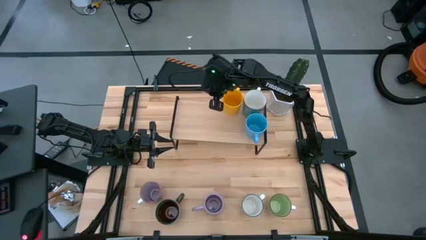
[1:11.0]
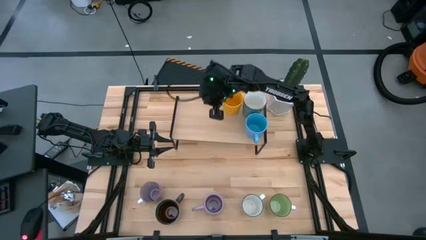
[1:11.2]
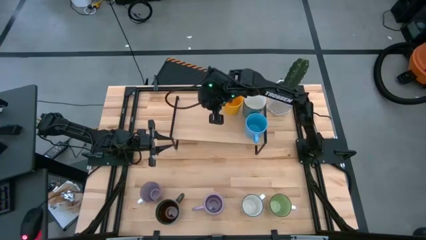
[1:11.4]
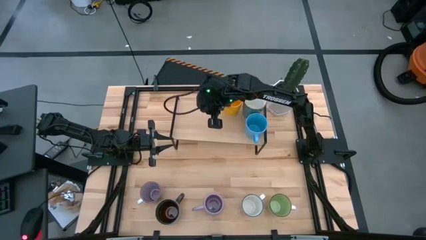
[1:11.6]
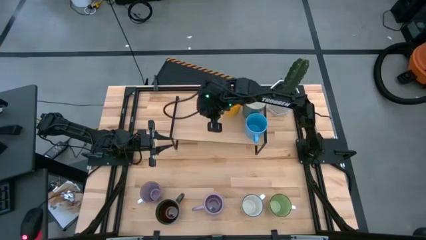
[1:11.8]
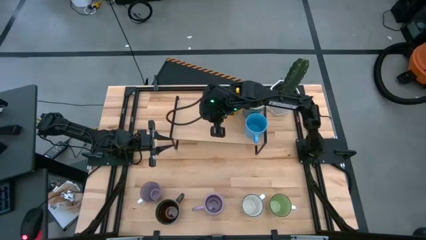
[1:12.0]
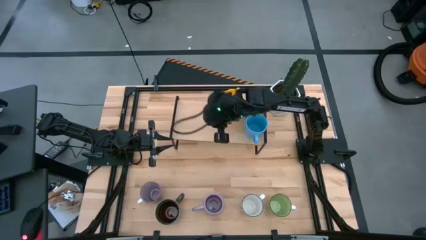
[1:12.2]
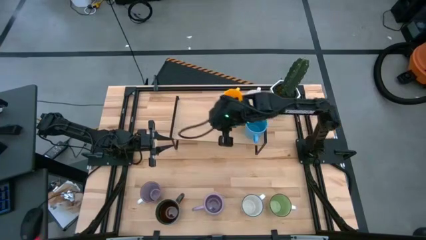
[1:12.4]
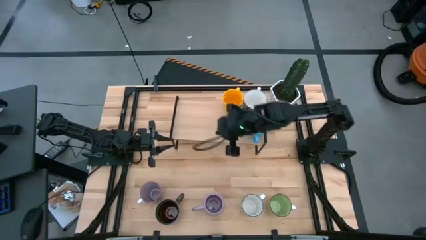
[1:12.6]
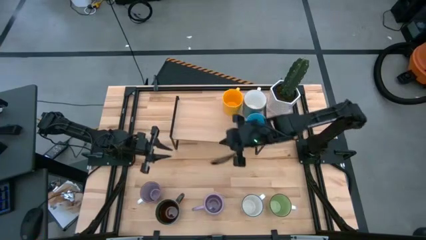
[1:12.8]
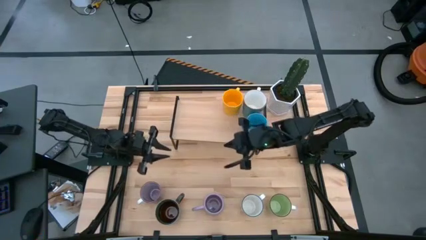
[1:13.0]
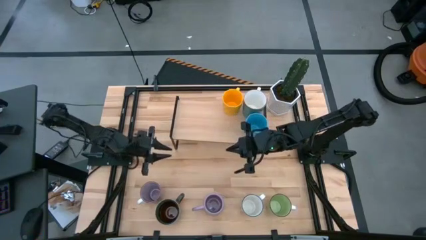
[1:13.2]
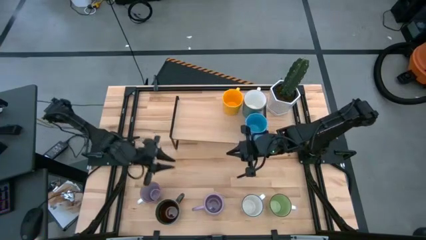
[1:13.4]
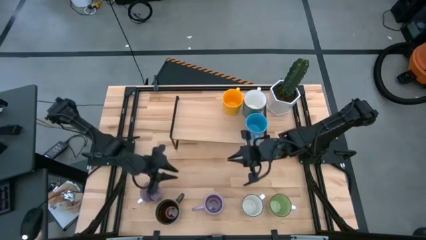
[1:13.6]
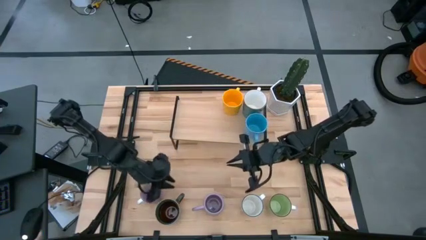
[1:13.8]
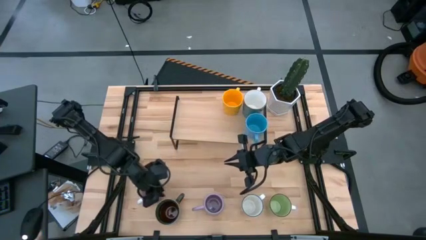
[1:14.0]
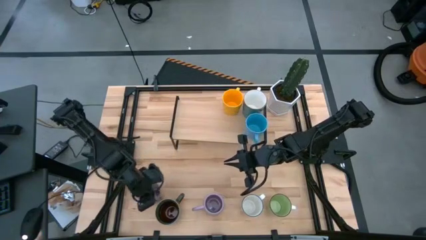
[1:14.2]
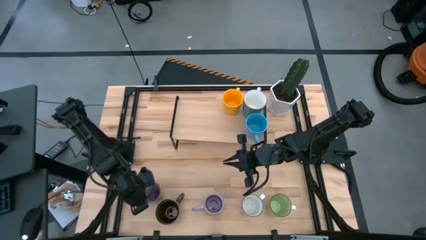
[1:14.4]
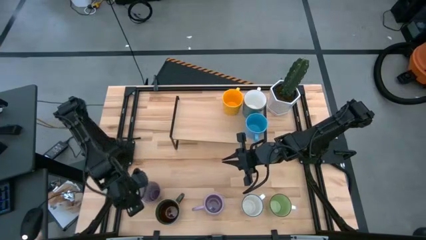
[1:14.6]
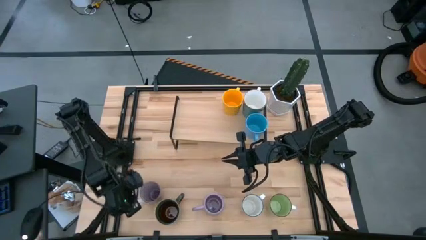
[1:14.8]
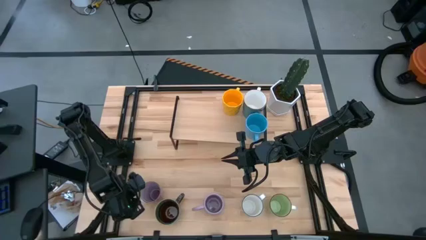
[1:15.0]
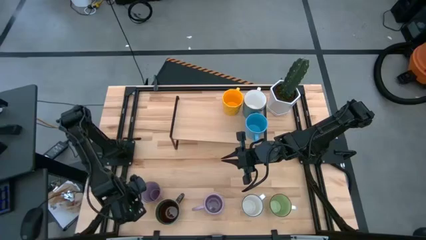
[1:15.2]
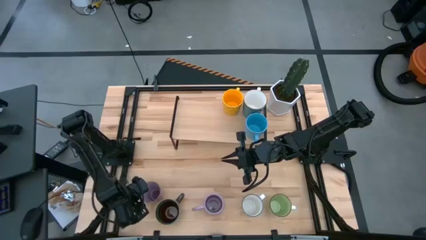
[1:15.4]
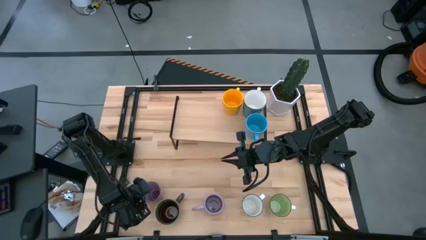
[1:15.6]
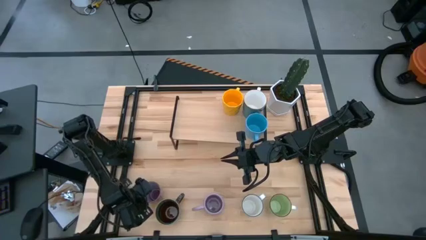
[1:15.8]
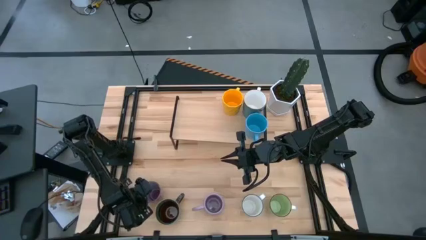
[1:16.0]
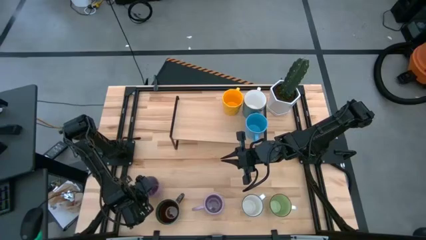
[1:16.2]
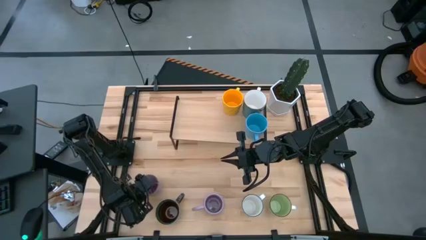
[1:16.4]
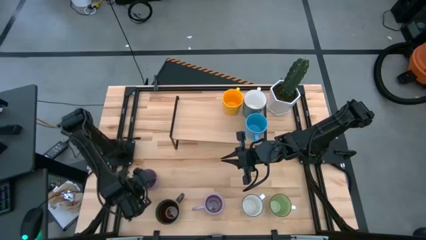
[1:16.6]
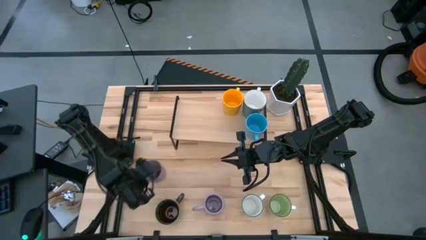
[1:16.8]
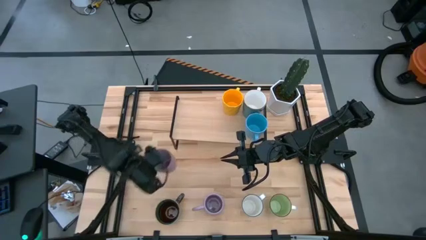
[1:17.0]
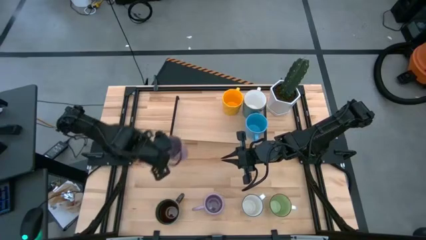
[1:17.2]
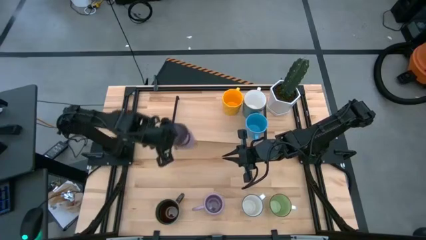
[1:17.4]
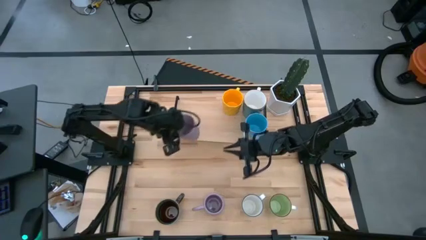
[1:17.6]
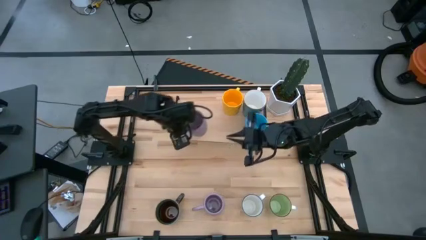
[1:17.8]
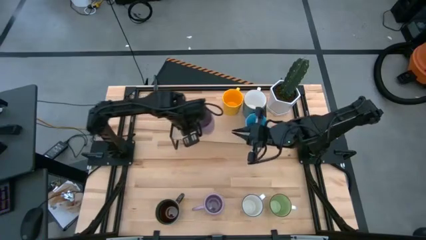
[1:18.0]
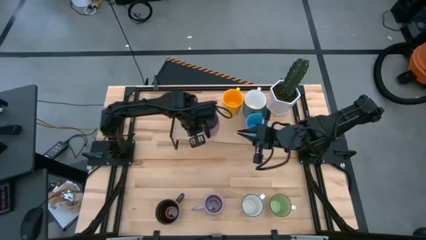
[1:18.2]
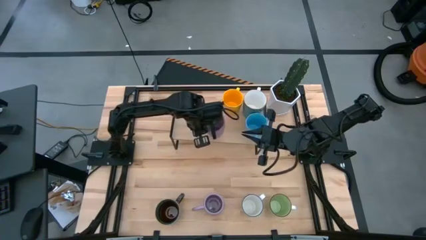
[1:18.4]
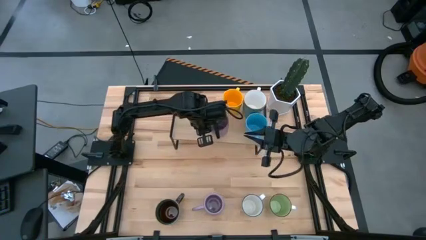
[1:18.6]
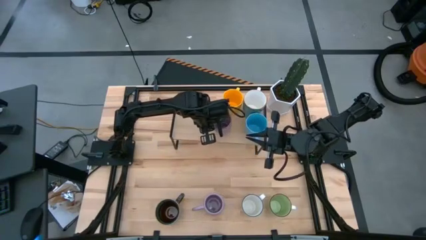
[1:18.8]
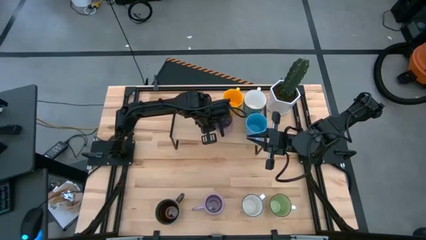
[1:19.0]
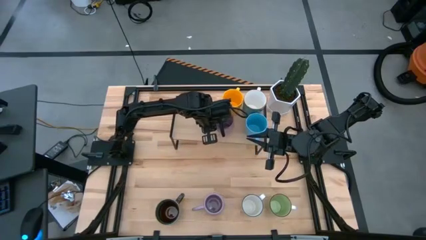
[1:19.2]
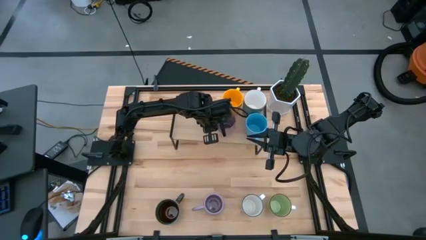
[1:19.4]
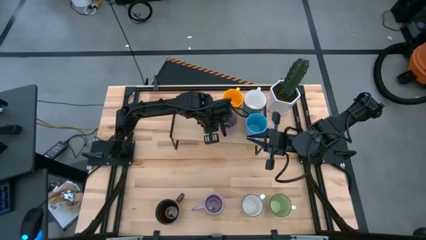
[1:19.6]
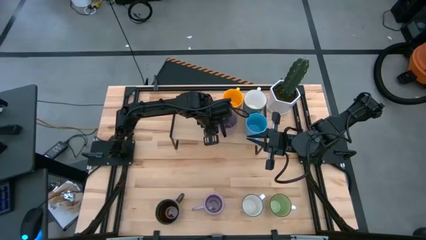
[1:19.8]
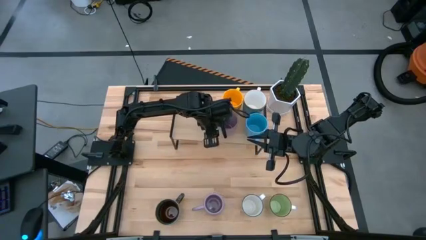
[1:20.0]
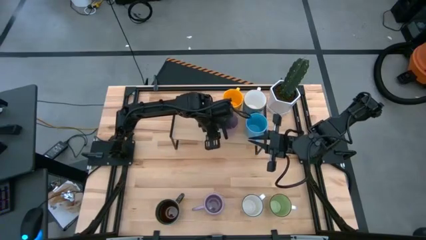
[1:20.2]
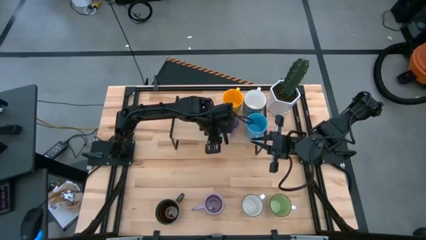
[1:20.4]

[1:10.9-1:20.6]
Task: Place coffee mugs
Put the left purple mug on the shelf

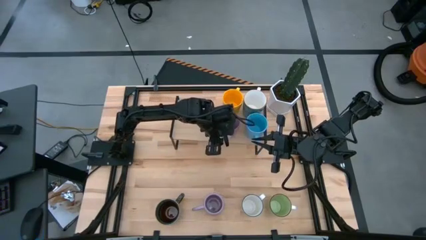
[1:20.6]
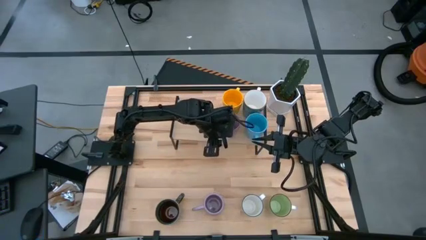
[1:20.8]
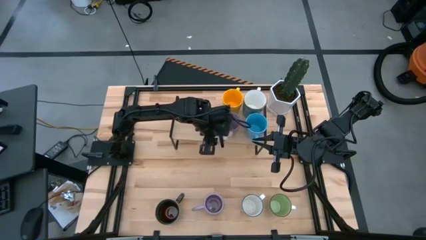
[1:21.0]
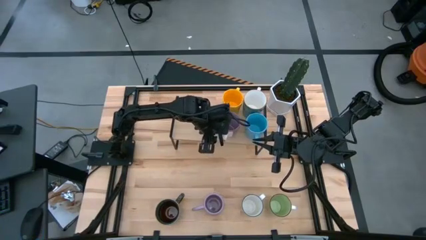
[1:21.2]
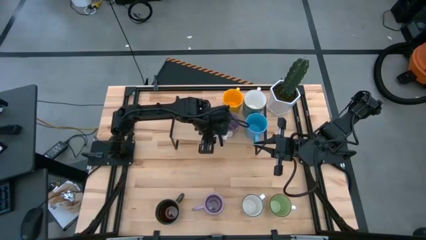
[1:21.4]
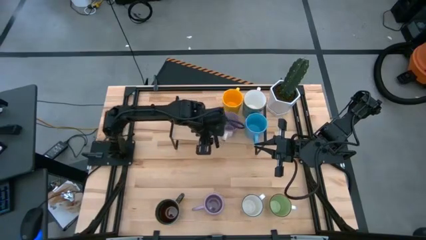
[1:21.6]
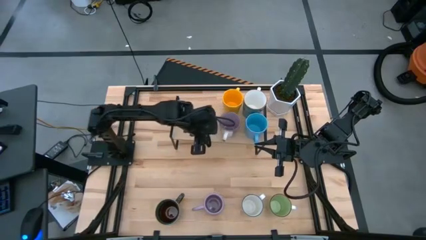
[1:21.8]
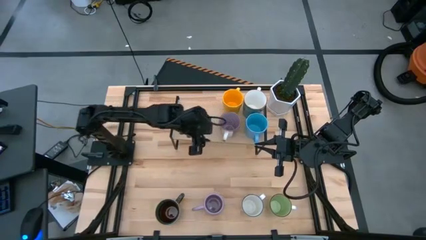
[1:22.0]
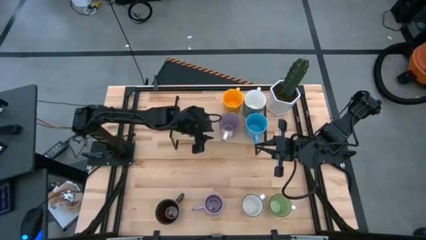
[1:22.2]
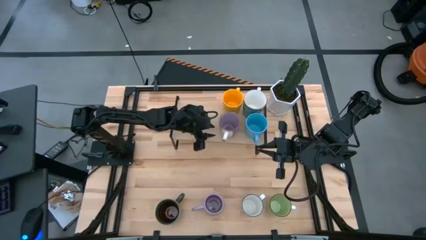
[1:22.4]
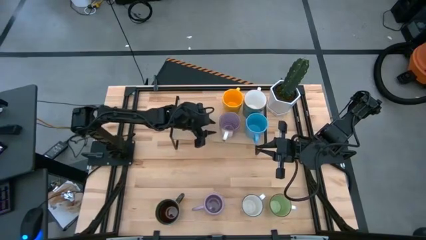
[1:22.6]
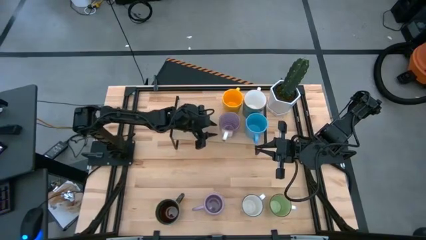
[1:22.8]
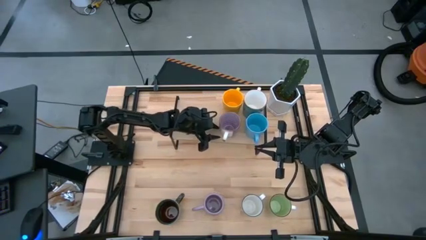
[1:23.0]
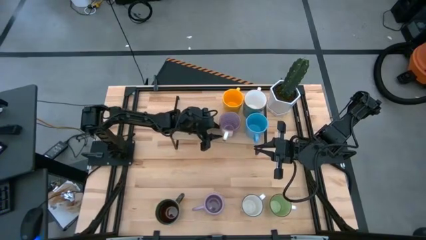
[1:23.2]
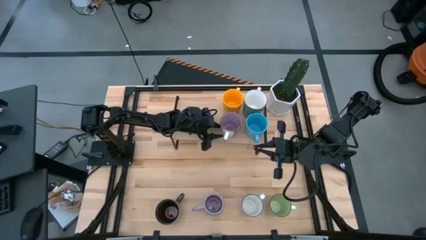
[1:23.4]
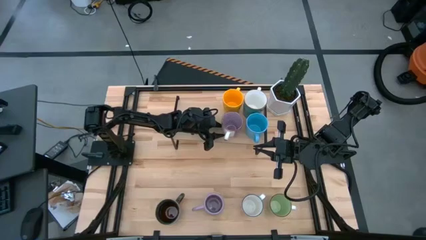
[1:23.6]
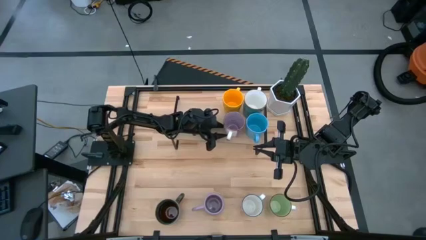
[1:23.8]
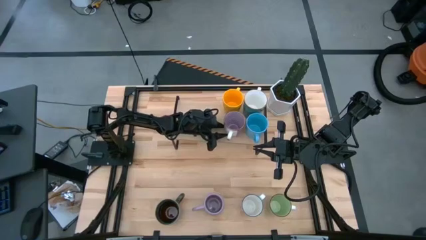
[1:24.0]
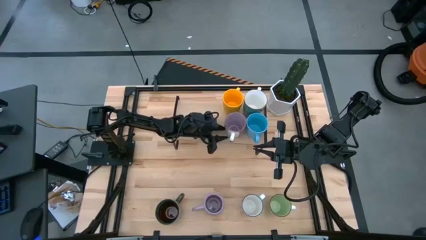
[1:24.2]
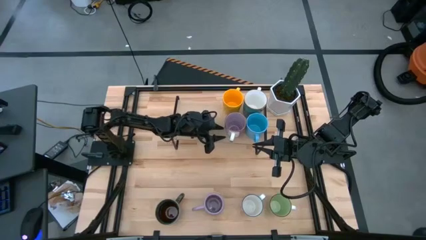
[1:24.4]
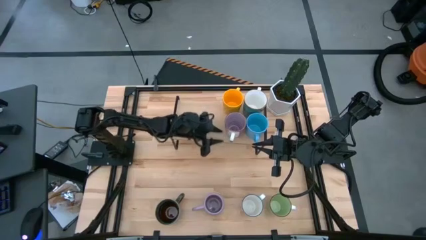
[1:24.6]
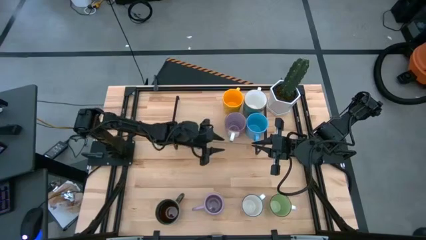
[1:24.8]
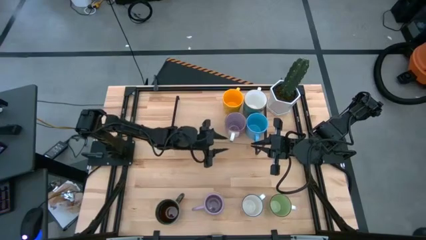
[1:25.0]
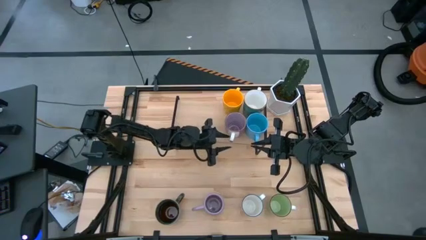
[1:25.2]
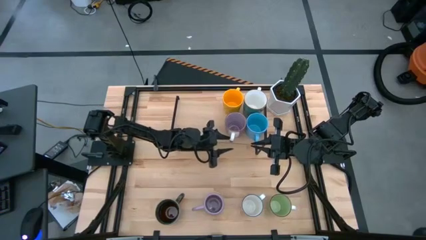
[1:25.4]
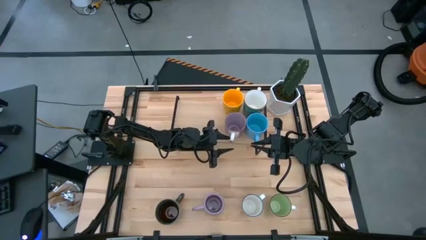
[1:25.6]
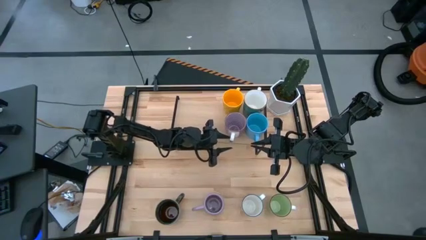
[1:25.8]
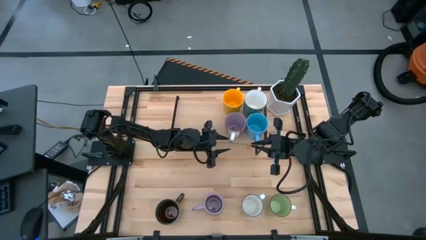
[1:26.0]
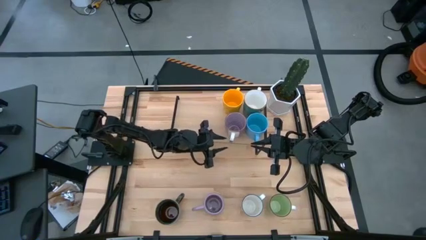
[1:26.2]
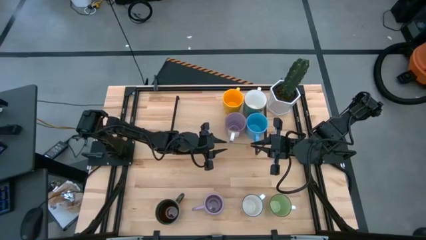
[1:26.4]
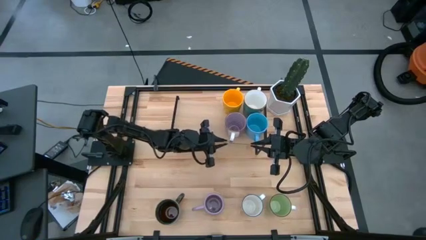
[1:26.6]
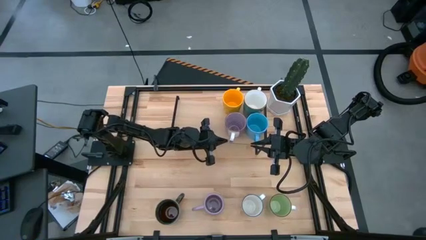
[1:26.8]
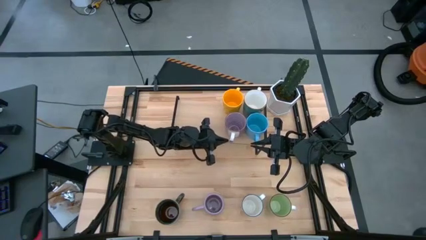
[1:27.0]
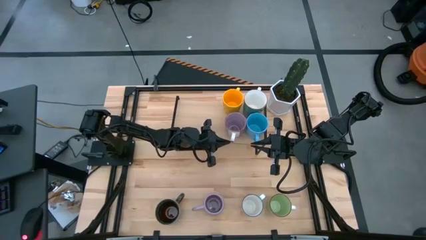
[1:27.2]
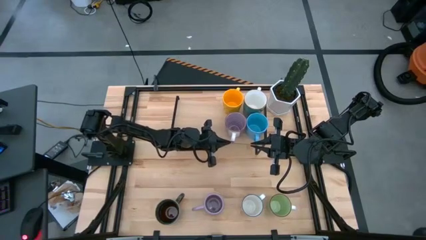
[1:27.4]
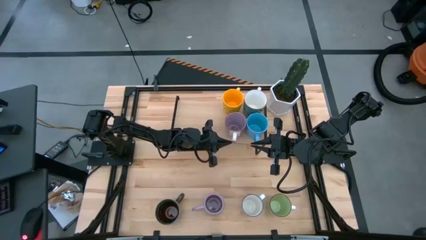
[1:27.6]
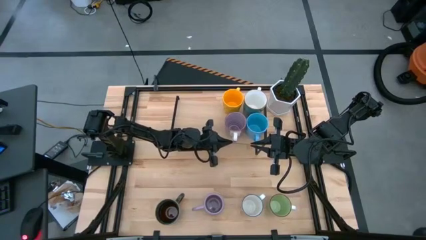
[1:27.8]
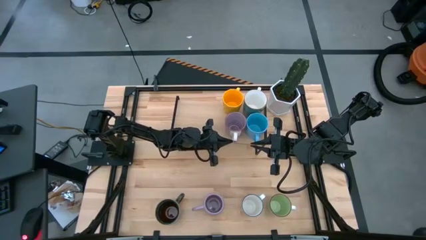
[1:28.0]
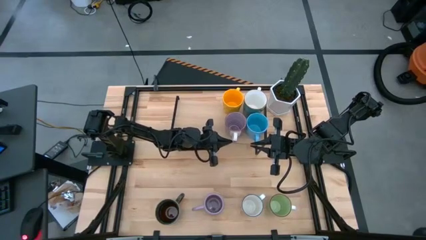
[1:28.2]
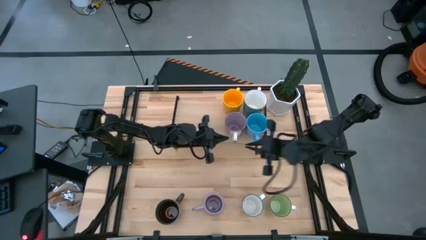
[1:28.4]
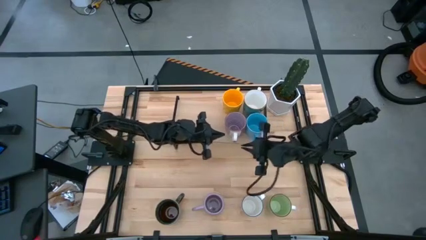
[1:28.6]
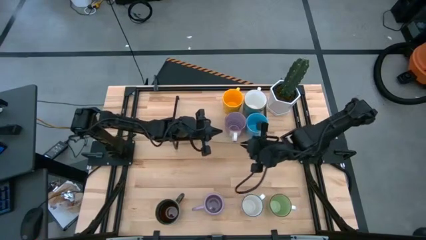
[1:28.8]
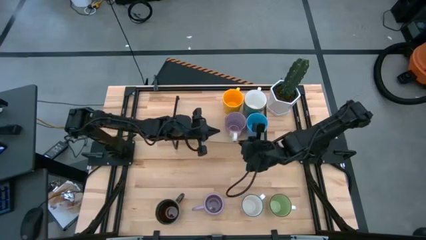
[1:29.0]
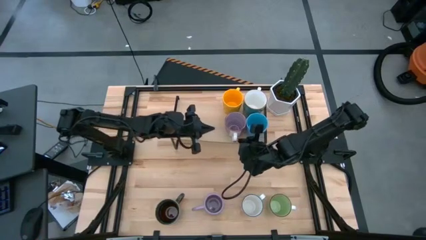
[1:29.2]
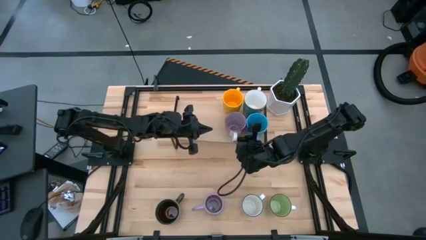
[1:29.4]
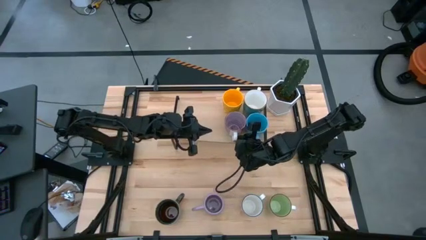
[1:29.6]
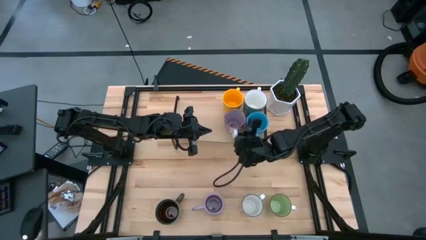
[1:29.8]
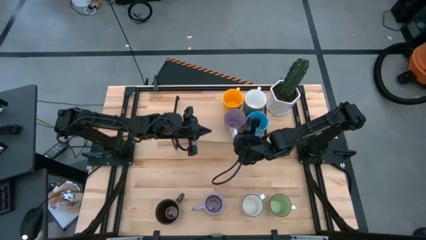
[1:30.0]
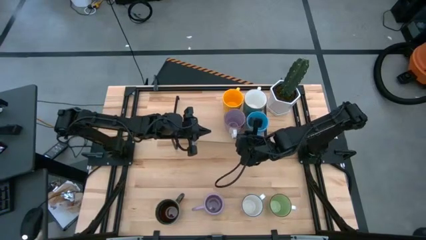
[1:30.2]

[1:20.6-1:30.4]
Put the left purple mug on the shelf
